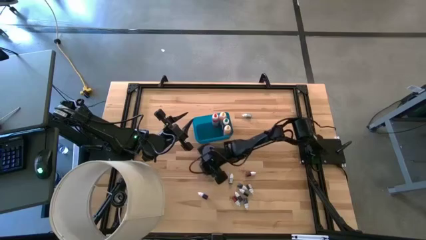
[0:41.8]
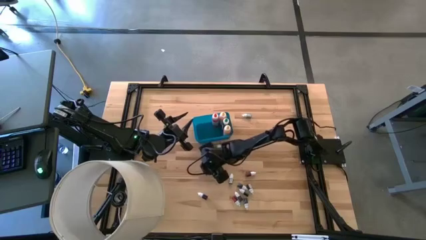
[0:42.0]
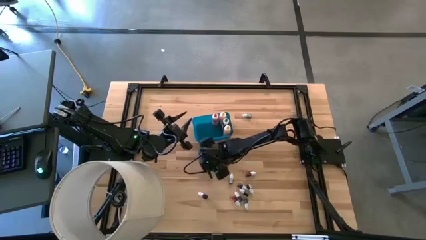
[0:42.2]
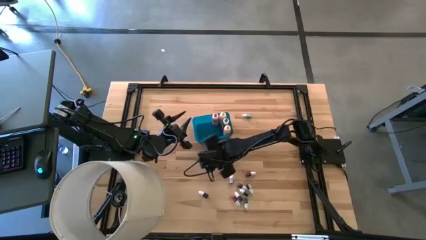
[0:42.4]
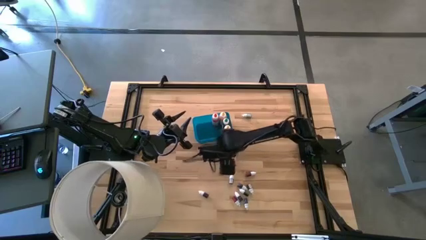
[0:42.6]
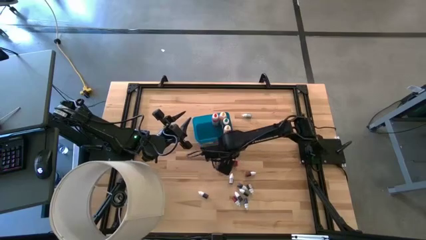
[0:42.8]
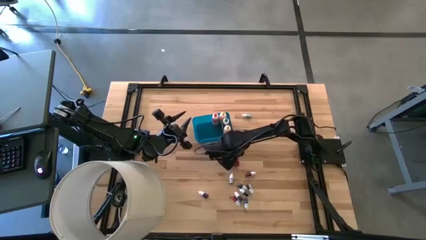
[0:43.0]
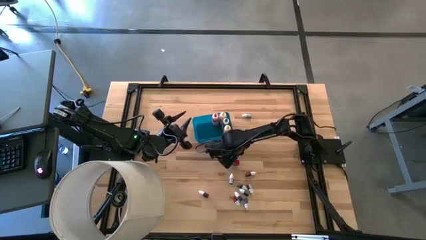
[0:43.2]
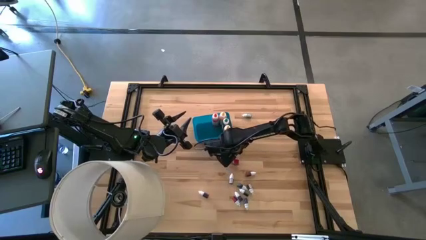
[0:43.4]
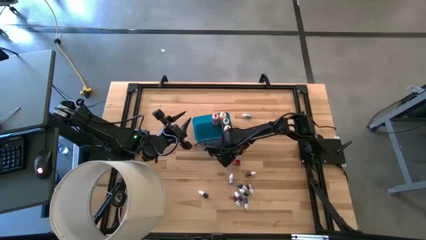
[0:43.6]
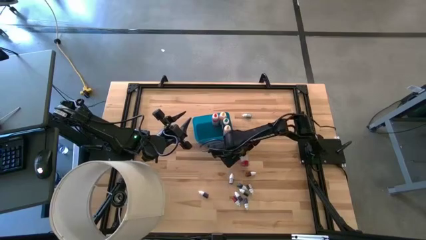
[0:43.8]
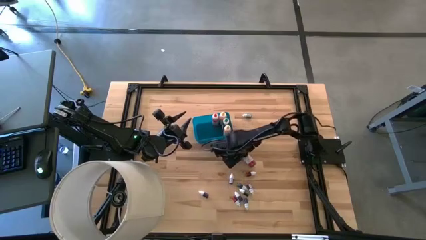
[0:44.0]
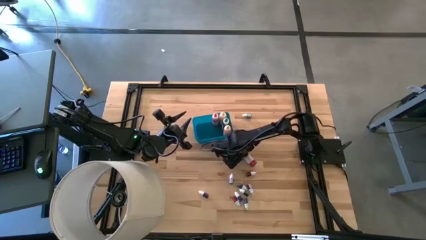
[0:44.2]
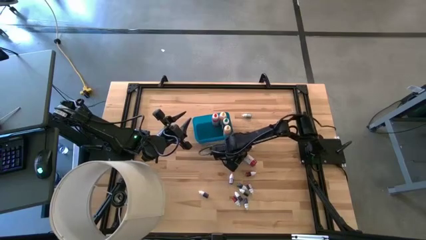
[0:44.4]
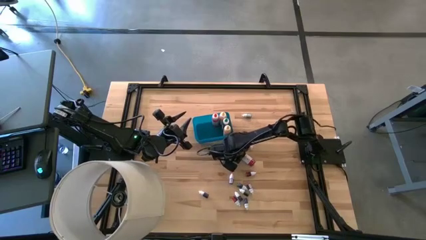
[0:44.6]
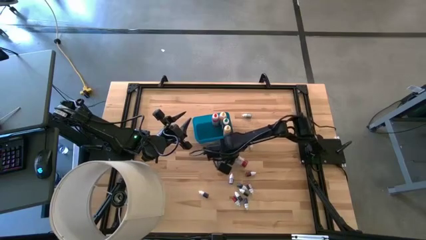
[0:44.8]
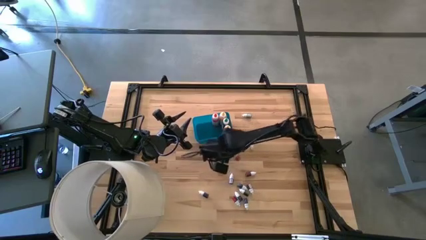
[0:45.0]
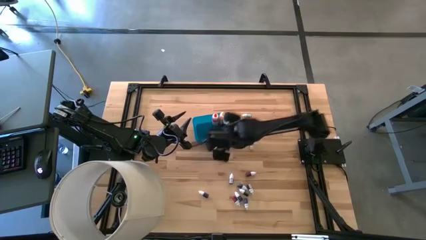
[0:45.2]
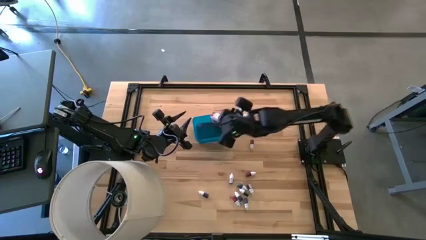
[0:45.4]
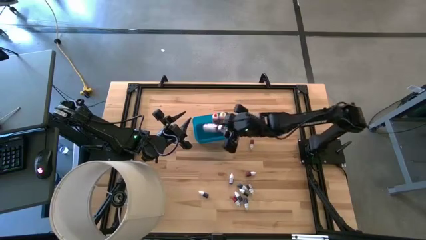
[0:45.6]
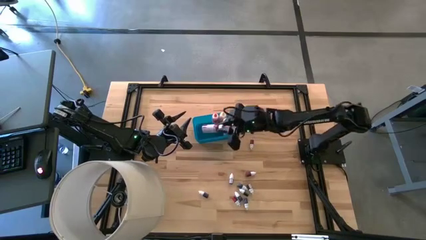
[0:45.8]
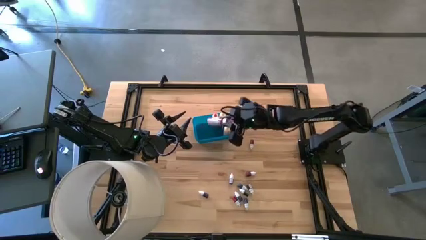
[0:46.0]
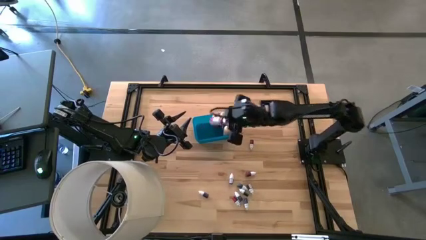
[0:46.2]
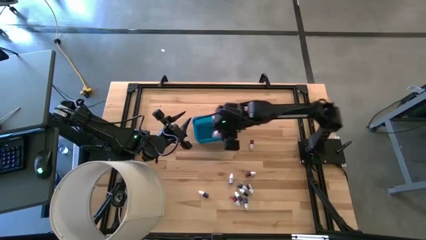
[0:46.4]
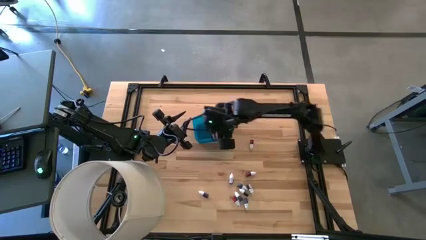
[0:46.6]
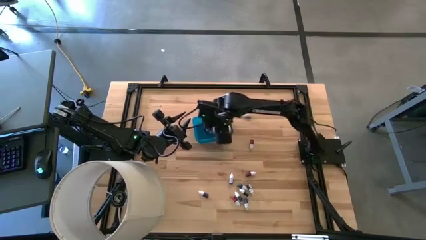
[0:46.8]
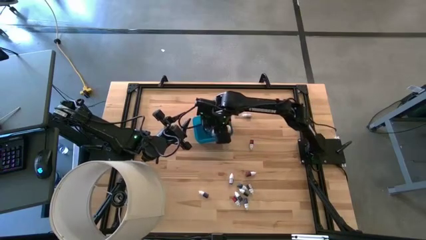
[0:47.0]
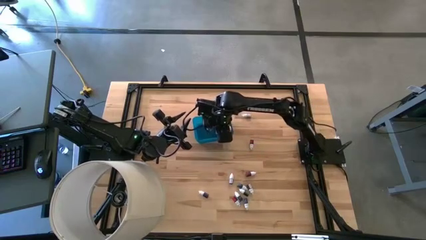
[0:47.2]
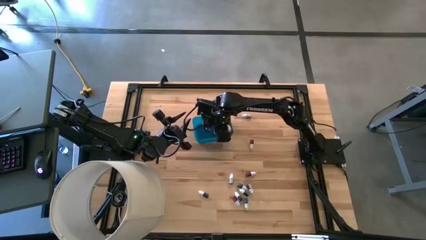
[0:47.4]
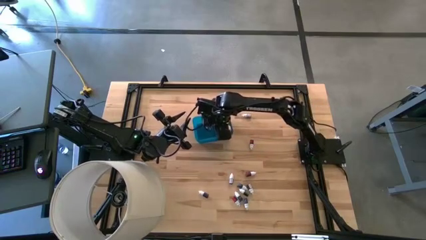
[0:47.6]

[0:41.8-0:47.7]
Task: Pick & Place food coloring
Put the big red food coloring bottle into the bin

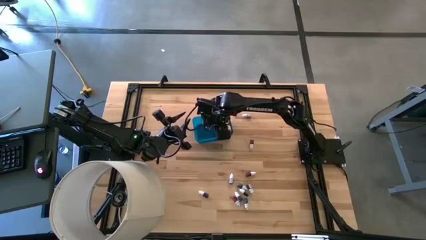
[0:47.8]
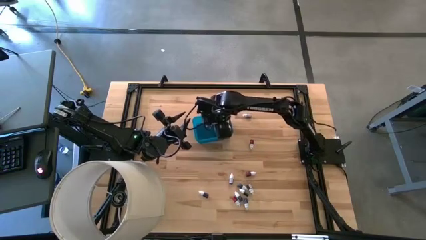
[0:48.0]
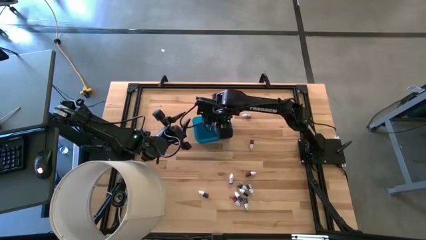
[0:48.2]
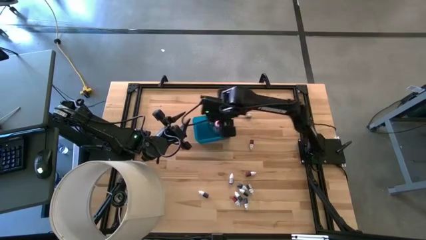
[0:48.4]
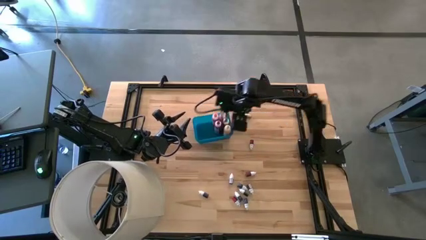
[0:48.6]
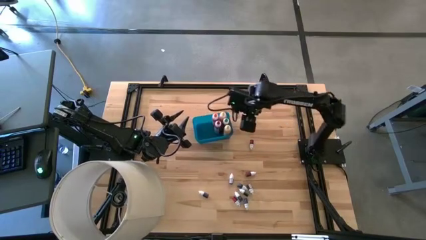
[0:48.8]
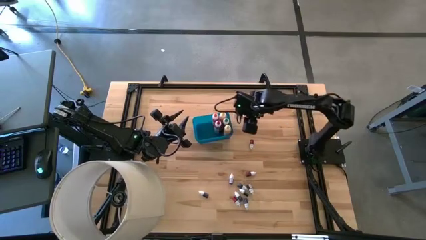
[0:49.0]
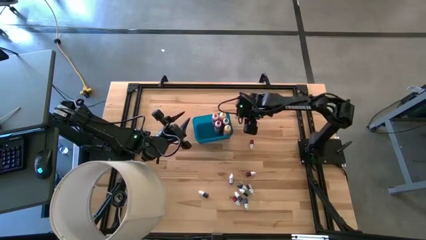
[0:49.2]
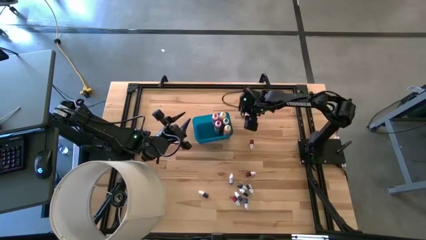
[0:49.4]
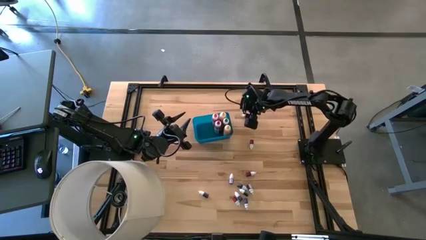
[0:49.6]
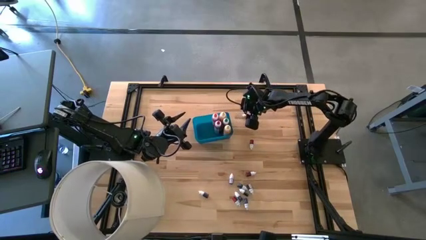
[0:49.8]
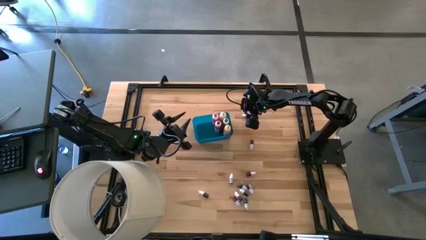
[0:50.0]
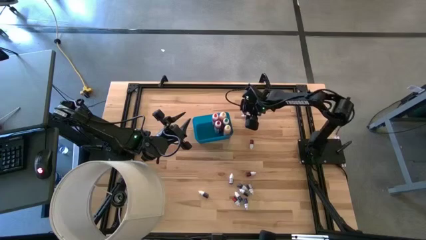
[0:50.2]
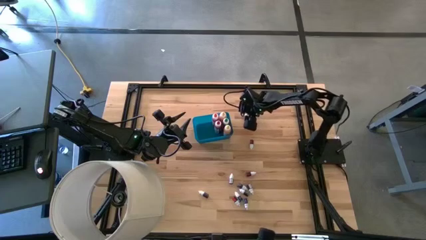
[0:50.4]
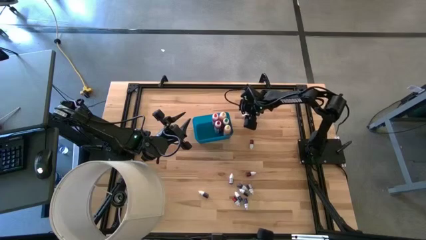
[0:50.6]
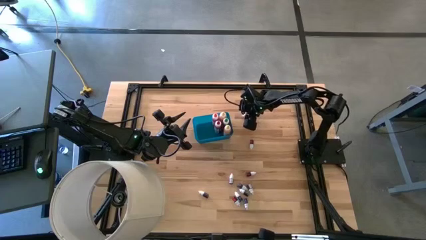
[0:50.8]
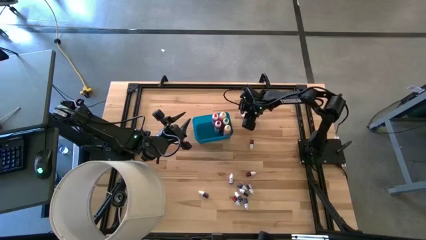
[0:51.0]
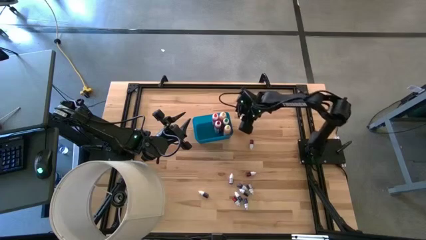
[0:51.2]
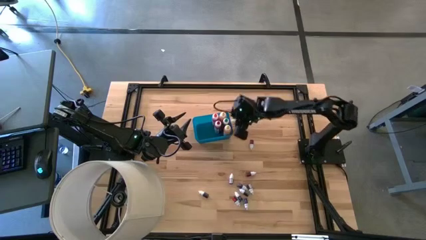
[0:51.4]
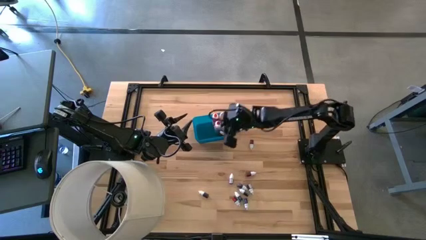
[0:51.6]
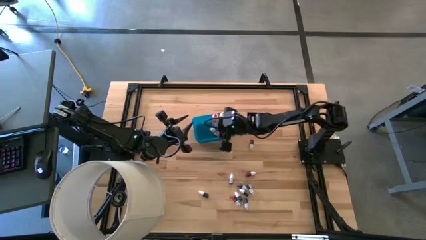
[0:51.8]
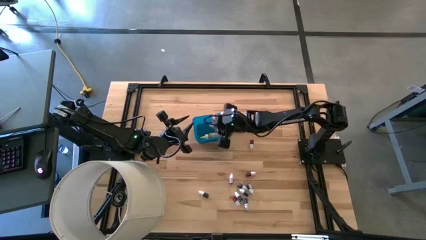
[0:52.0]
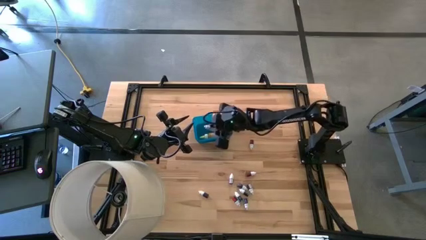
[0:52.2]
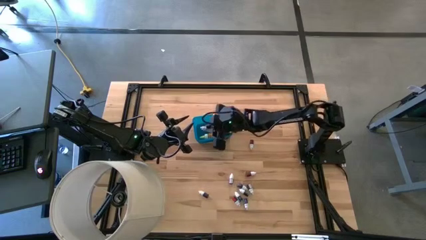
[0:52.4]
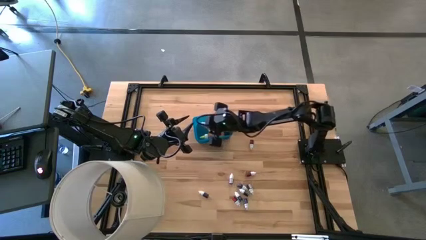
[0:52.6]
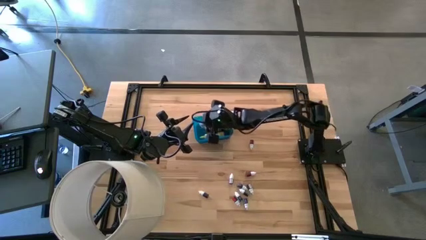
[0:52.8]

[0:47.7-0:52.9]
Put the top small green food coloring bottle into the bin

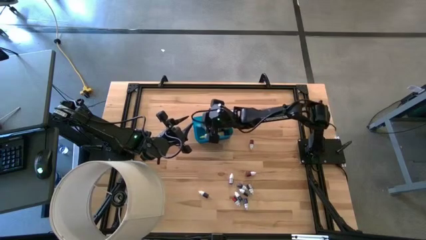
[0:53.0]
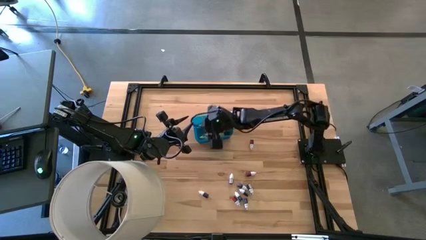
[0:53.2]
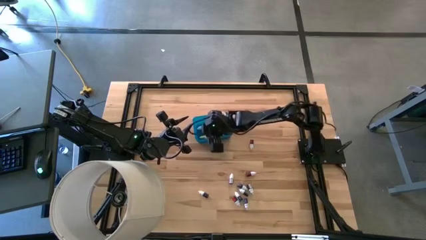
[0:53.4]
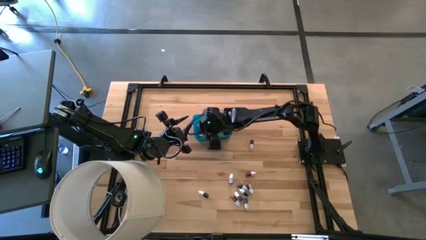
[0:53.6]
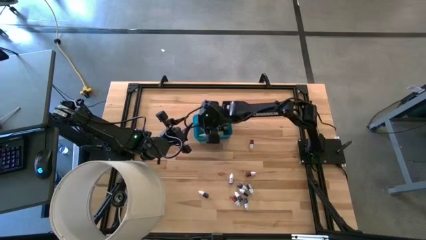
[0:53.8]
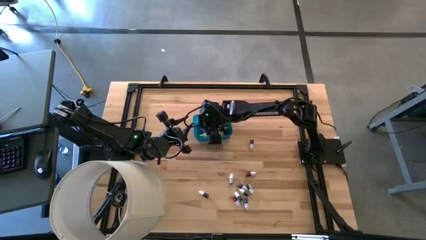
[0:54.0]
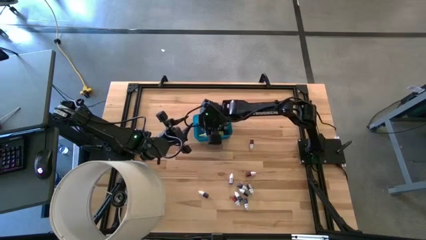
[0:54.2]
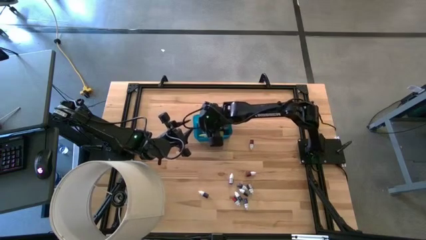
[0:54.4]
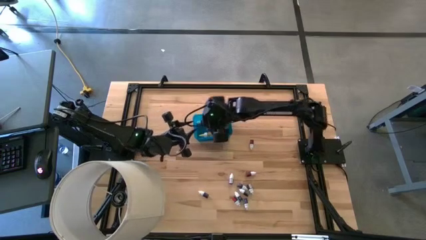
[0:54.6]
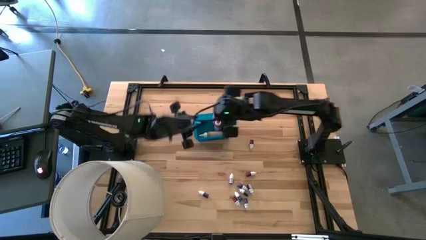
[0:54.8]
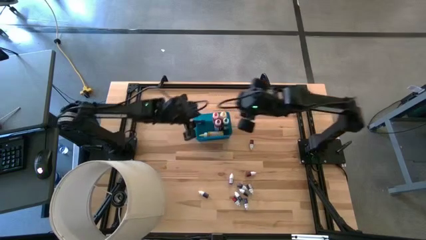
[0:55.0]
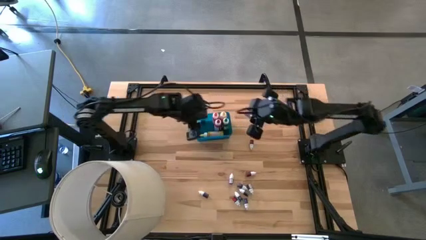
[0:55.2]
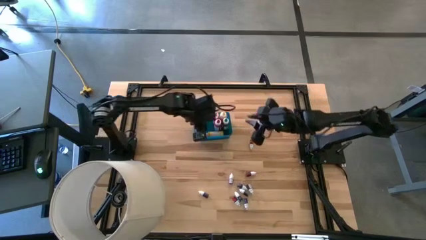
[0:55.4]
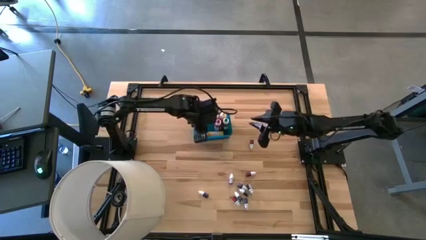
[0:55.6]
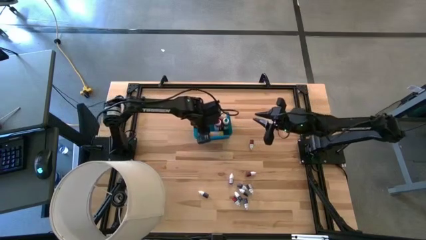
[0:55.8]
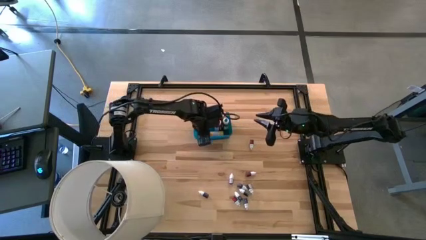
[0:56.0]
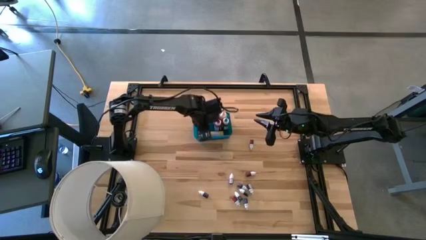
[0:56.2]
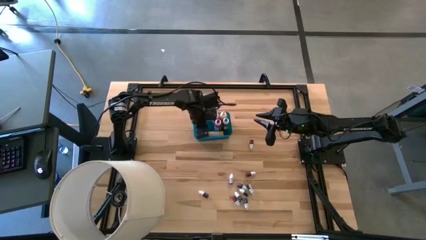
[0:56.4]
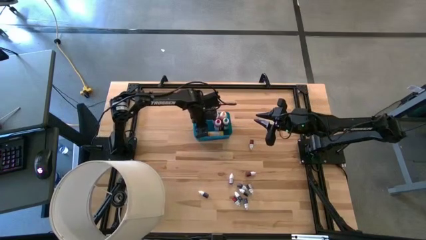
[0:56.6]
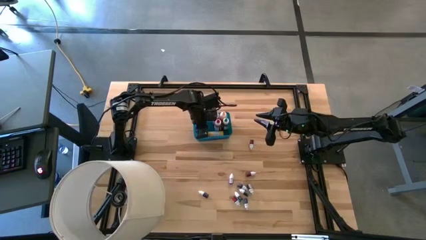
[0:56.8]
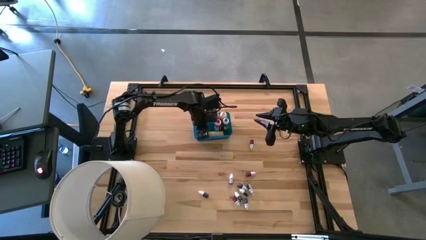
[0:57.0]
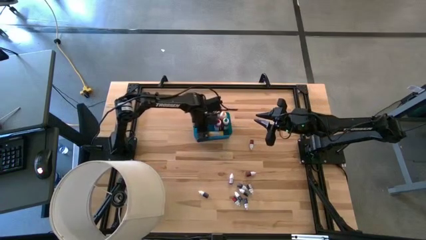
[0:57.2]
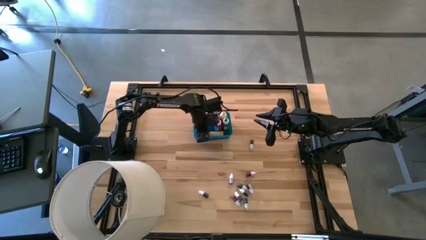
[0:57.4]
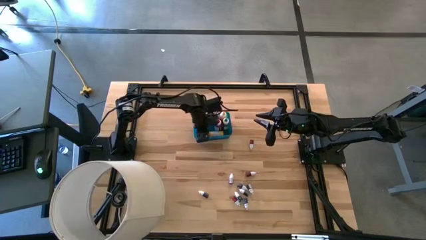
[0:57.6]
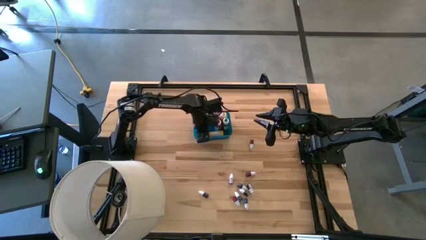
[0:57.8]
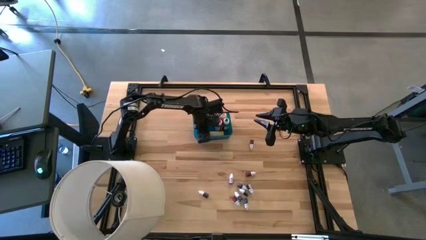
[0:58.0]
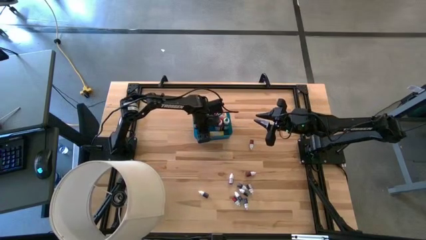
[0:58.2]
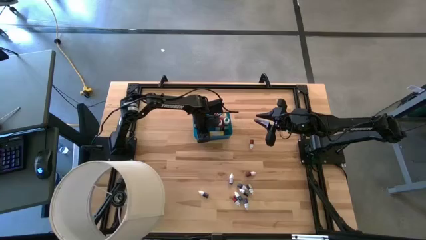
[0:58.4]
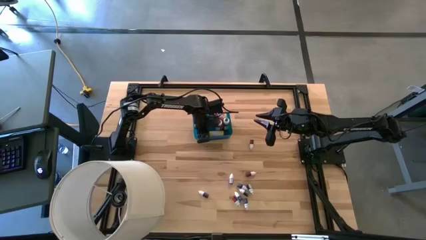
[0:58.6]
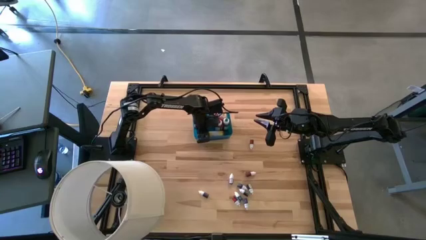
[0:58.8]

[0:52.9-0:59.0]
Adjust the yellow food coloring bottle in the bin
